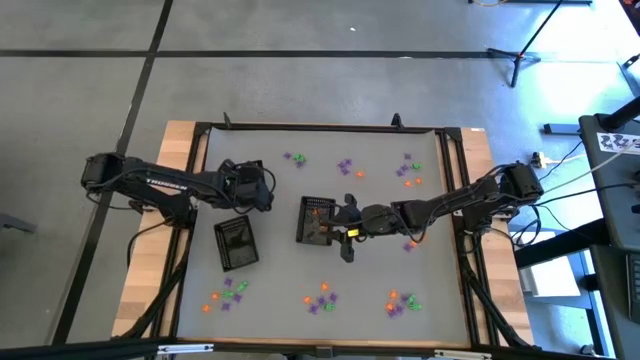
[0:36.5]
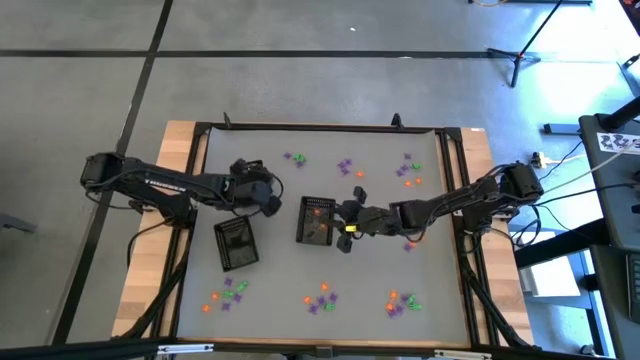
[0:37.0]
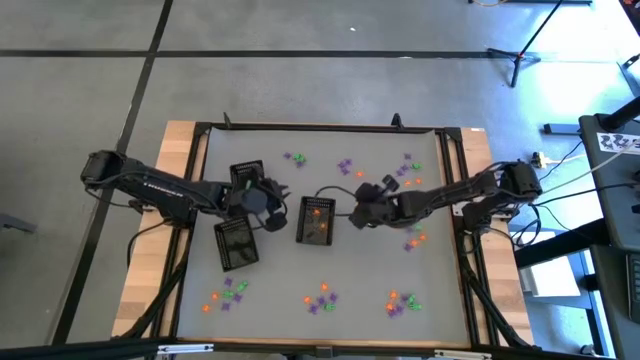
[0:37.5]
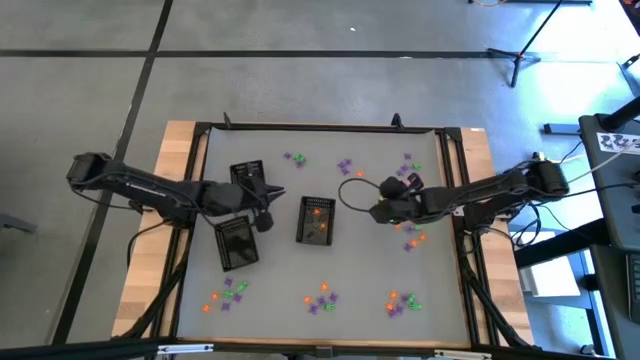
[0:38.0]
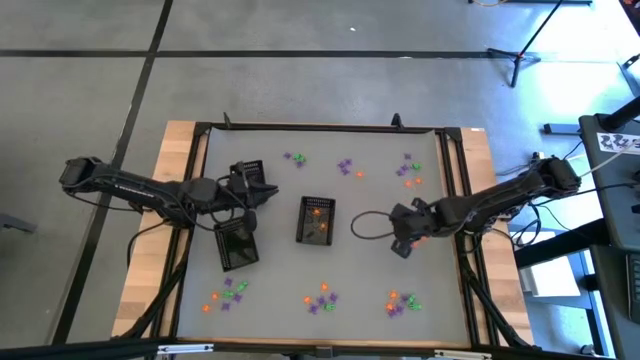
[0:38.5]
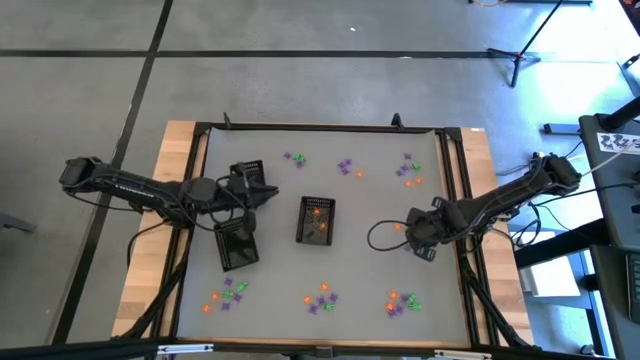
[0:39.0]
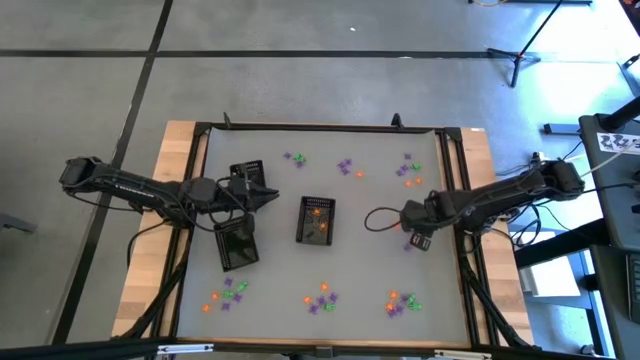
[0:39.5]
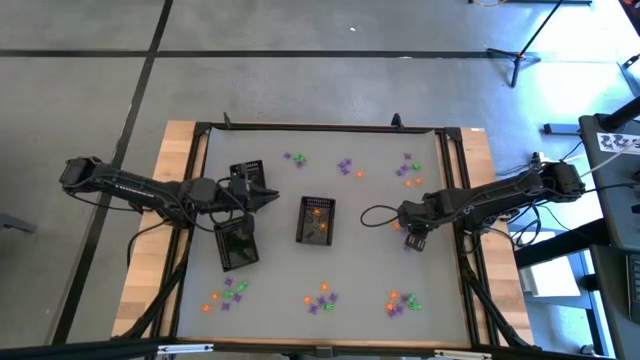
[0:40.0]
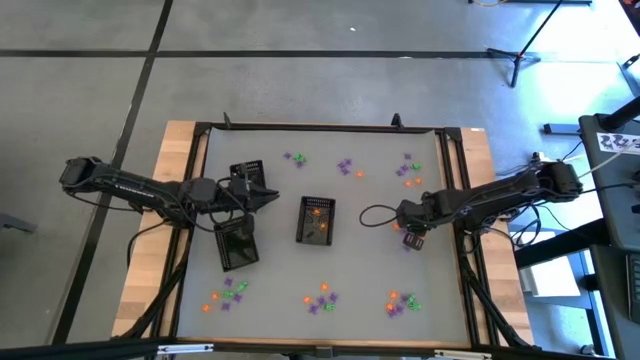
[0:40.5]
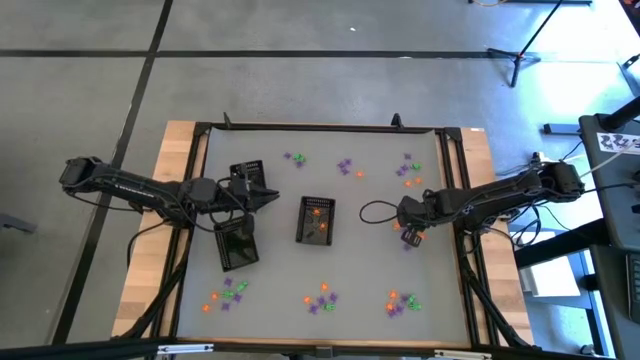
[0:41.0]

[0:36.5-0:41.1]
Task: Sort Halloween decoration
Put the green alien toy into the top left black basket

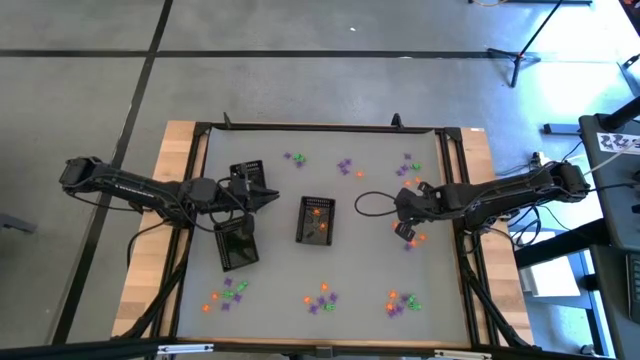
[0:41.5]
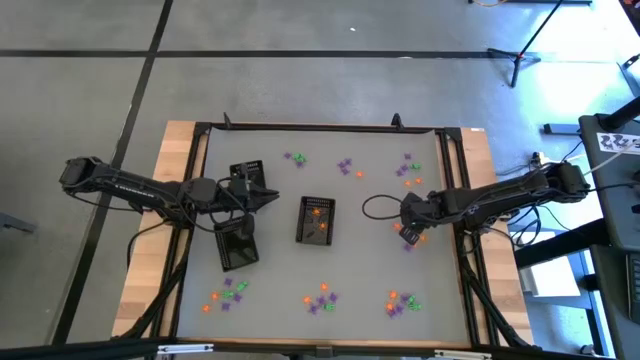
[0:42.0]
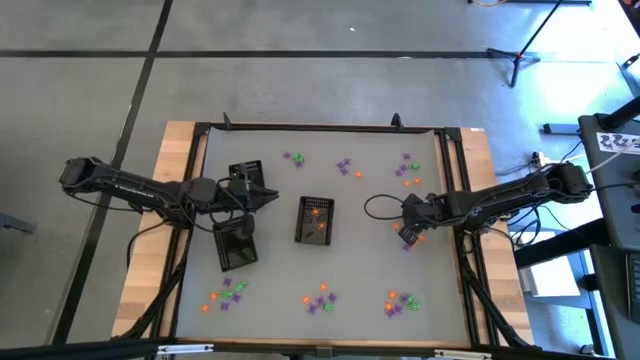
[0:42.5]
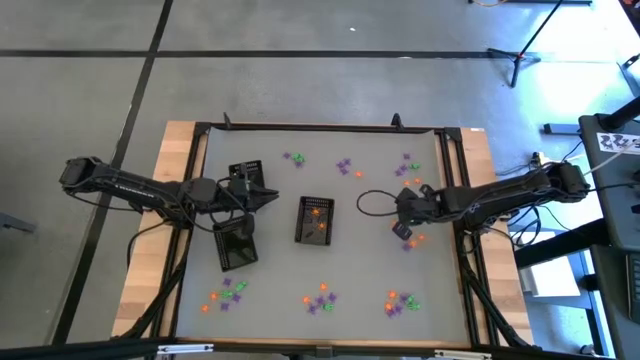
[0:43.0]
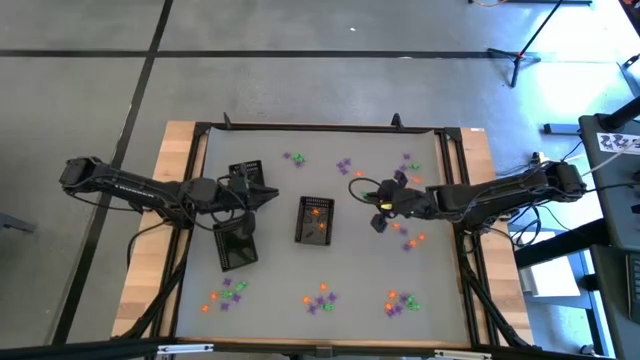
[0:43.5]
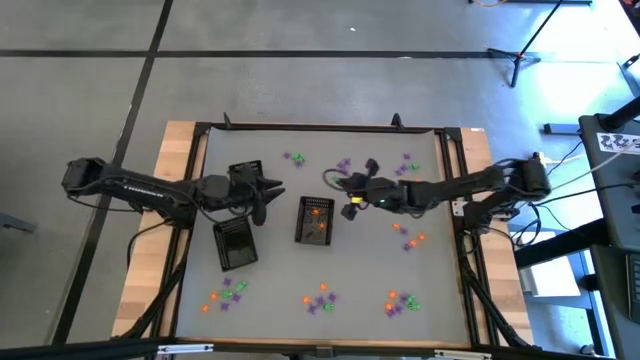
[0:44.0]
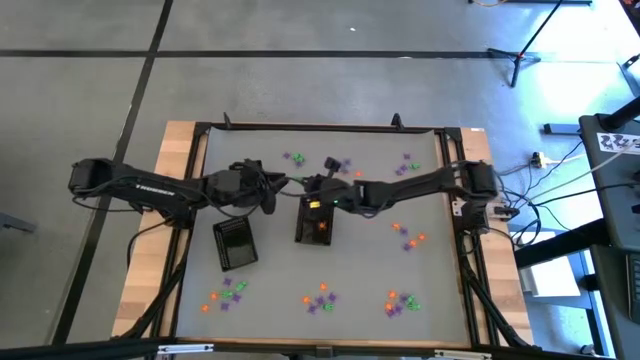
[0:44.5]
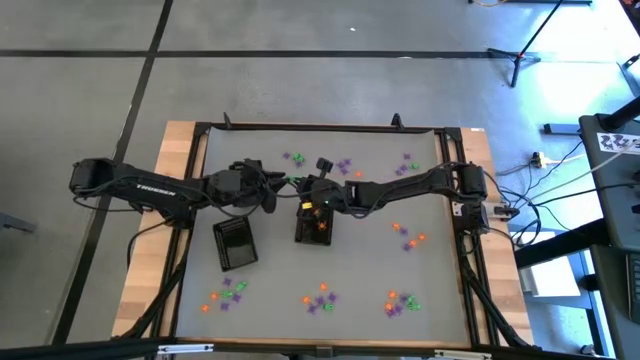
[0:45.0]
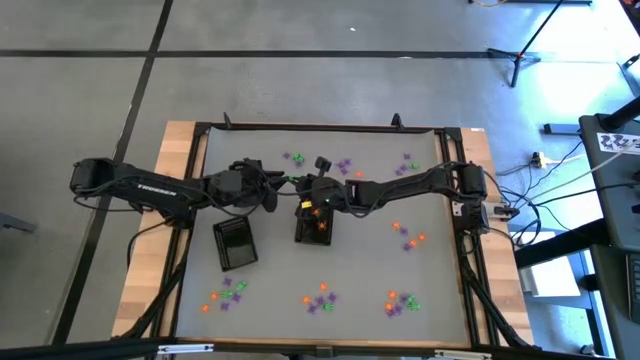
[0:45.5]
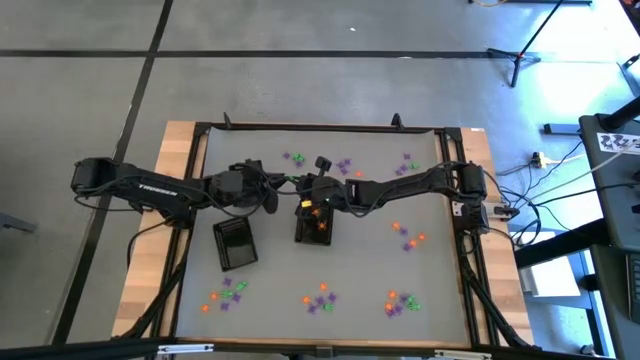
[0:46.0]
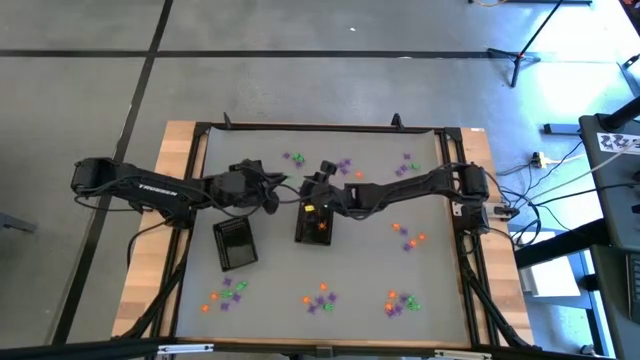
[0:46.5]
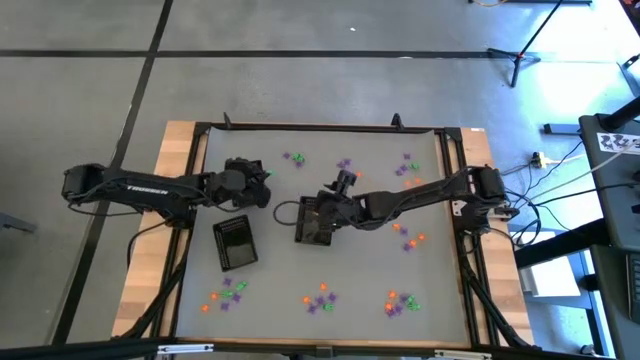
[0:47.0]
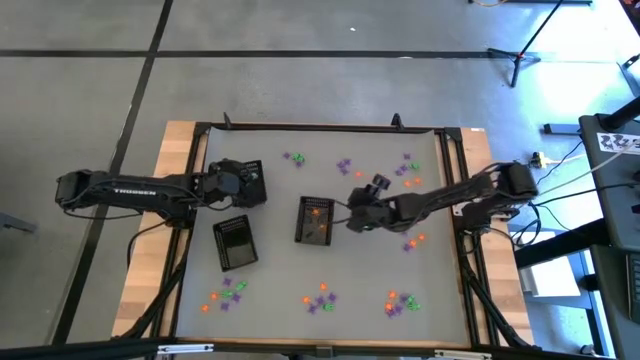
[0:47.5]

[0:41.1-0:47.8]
Put the green alien toy into the top left black basket

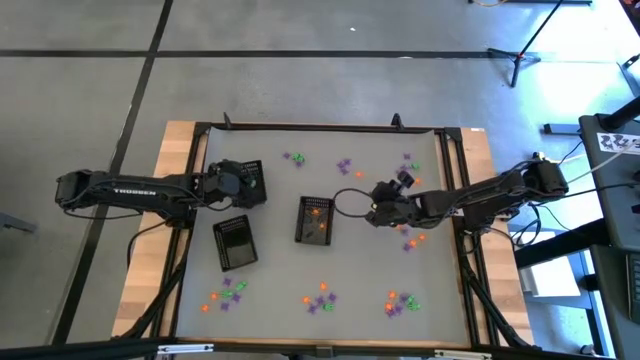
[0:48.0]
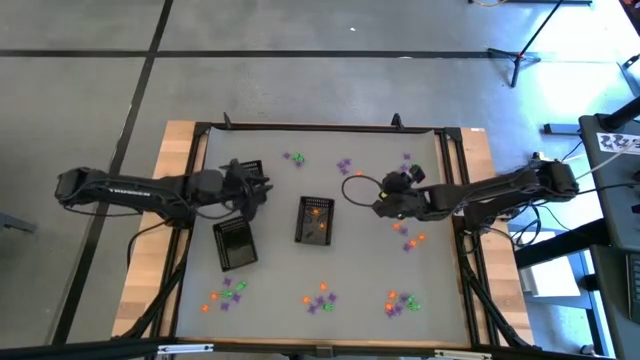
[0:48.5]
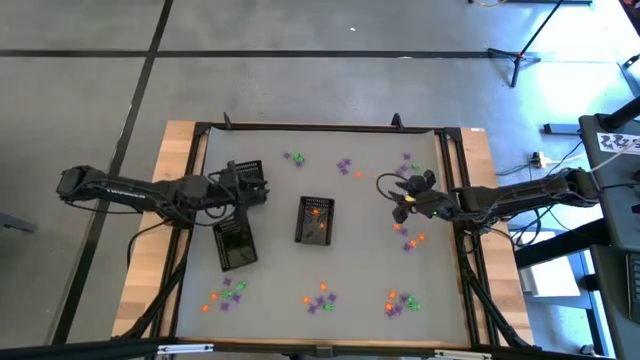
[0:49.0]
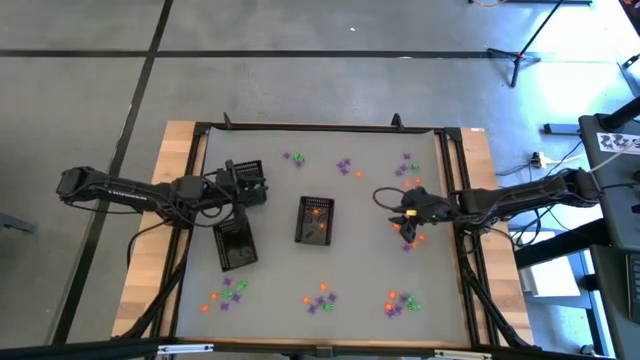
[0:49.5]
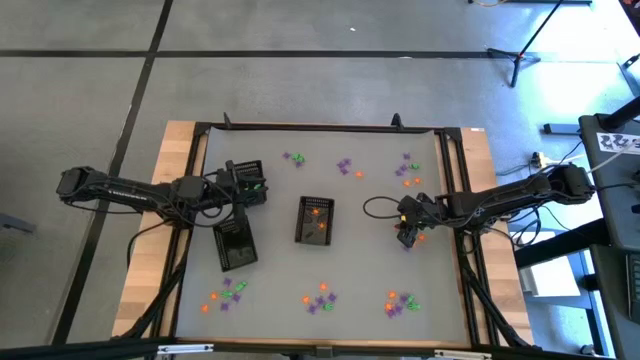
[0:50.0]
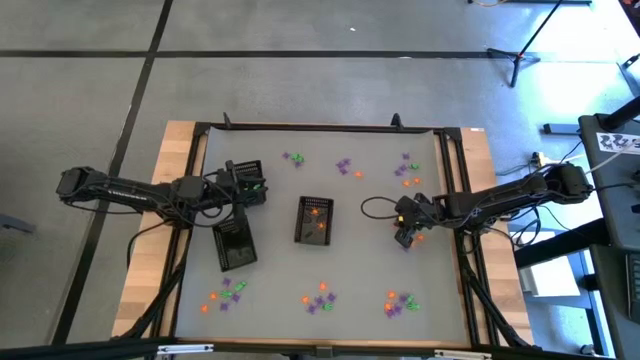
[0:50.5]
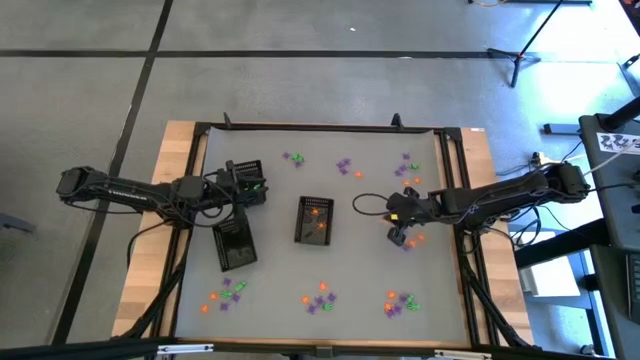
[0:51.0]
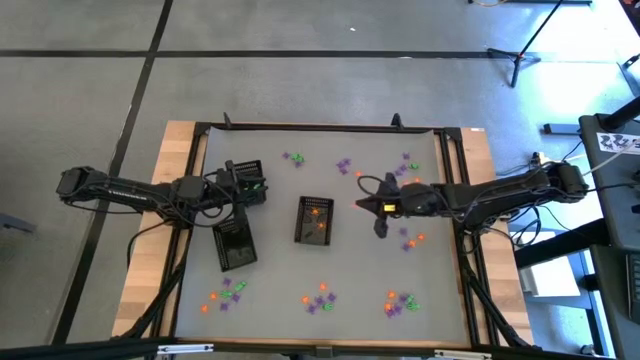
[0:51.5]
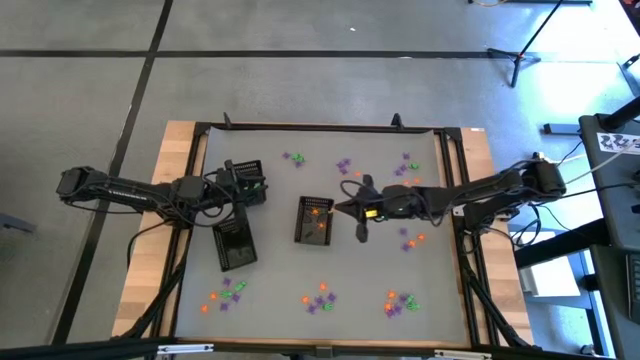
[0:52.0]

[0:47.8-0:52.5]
Put the orange spider toy into the bottom right black basket

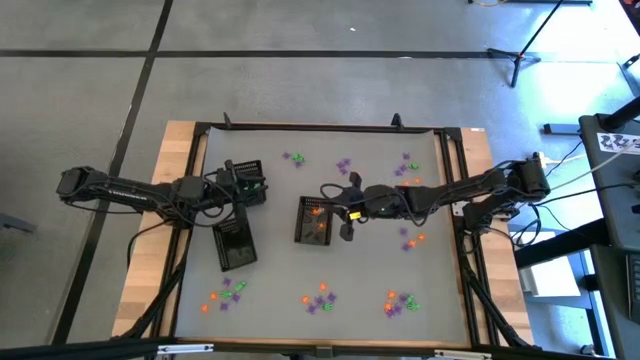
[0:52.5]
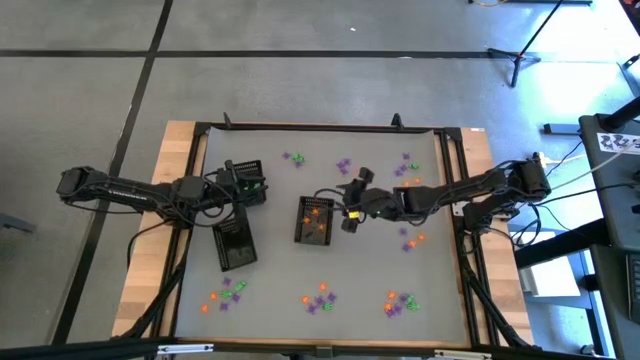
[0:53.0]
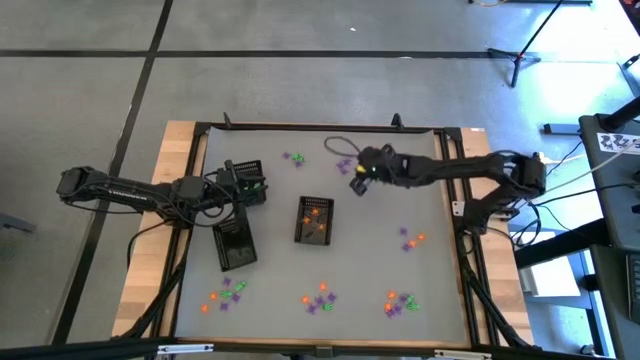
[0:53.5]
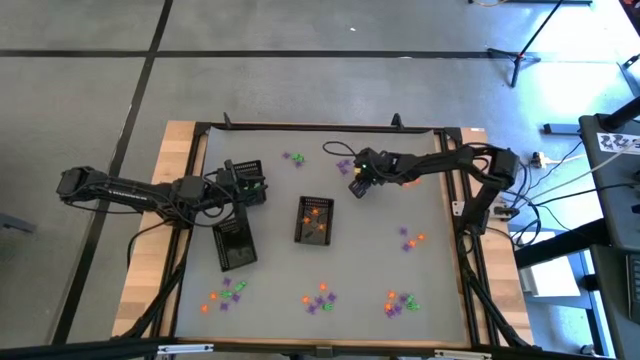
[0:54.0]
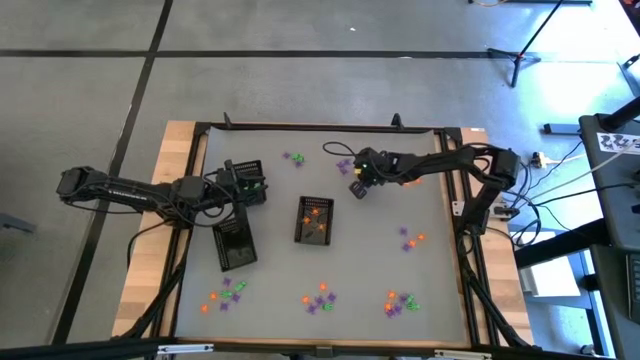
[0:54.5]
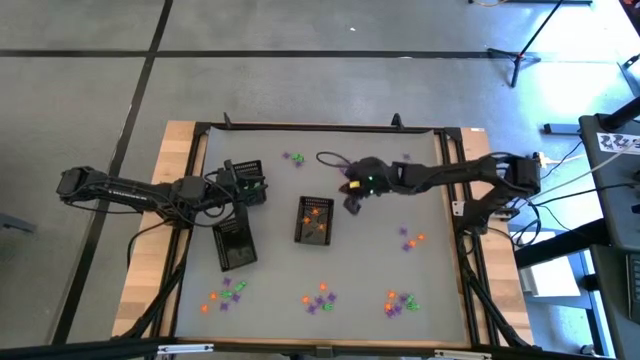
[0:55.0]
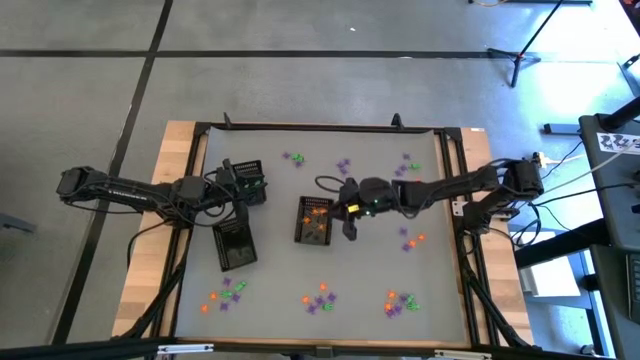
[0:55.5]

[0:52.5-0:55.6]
Put the orange spider toy into the bottom right black basket

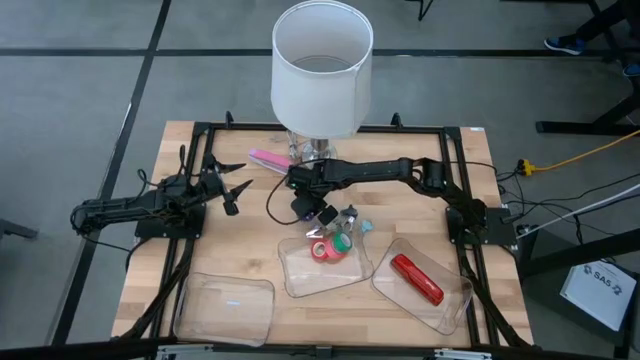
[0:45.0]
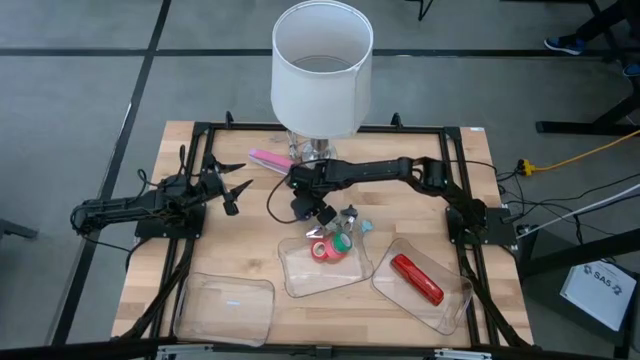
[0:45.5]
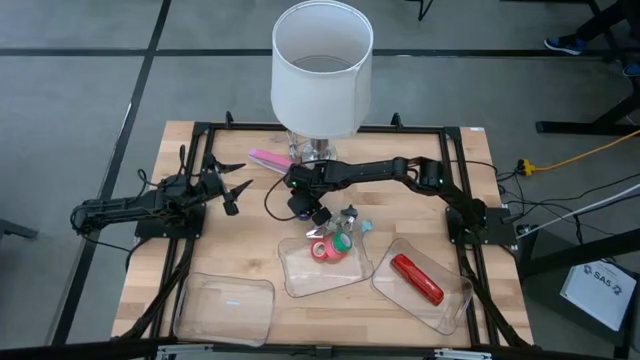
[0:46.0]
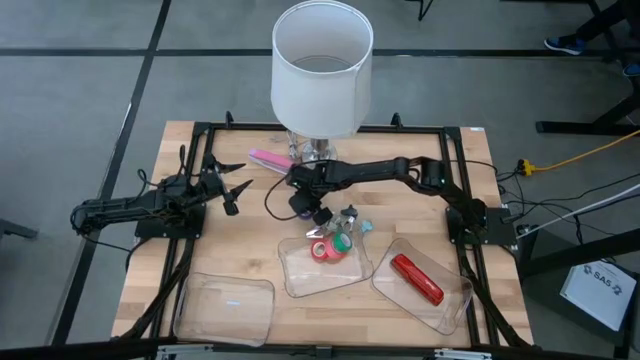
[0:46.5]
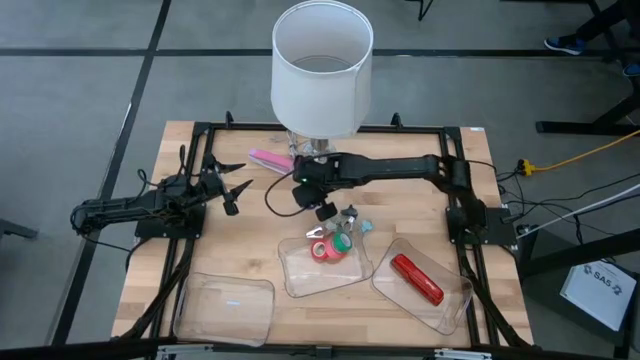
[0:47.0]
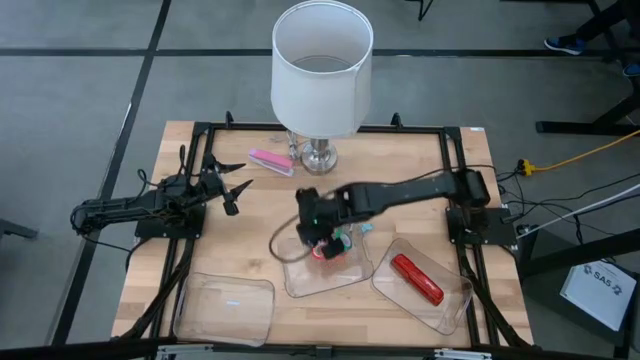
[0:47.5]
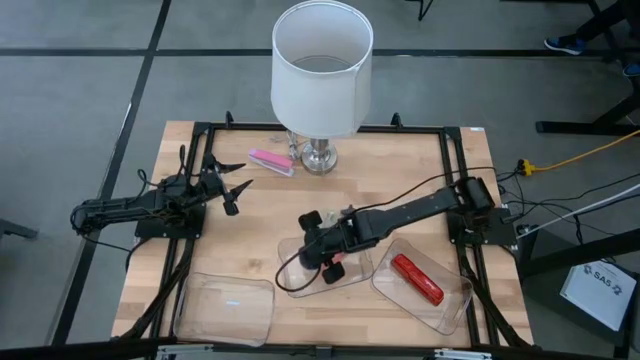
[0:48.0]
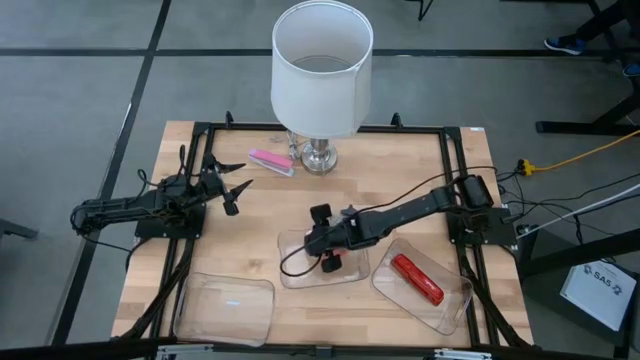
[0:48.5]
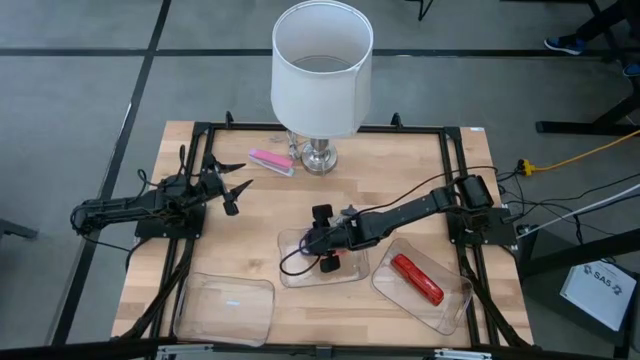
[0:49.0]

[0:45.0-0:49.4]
Task: Pick and place Stapler, Stapler remover, tape
Put the blue tape into the top transparent bin
